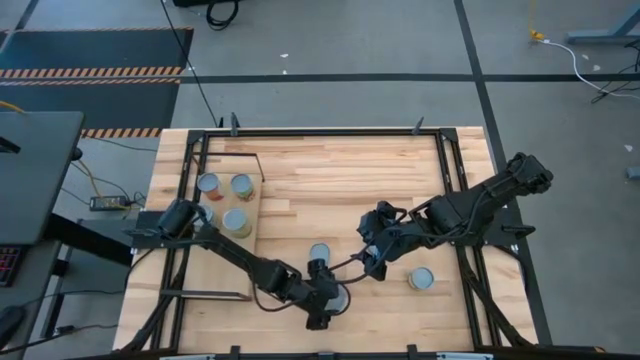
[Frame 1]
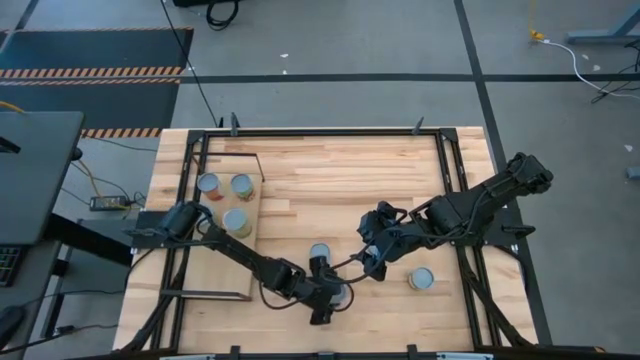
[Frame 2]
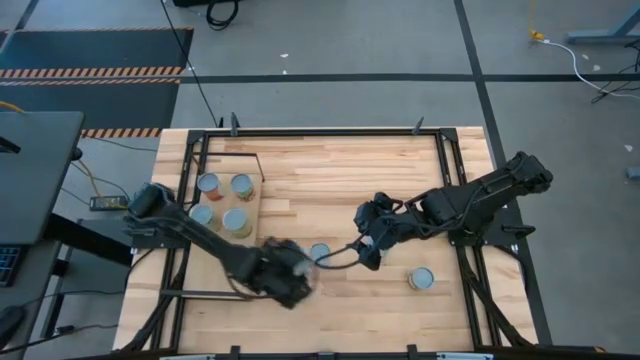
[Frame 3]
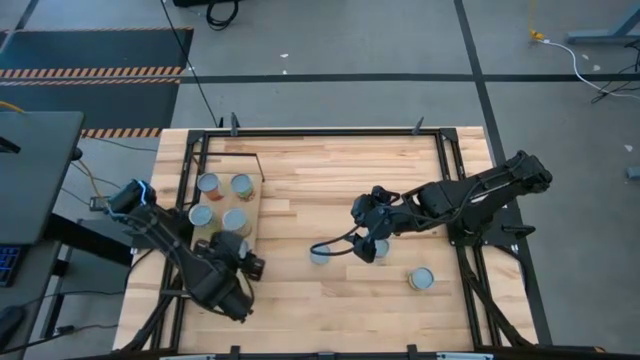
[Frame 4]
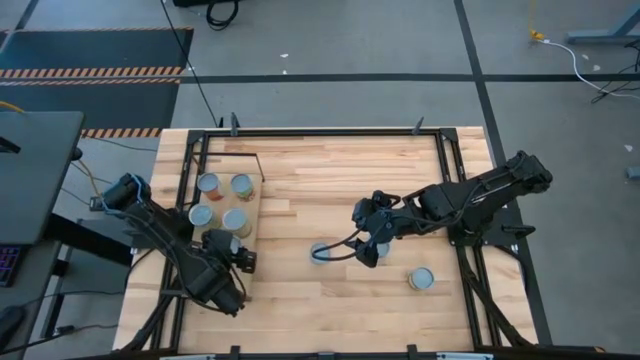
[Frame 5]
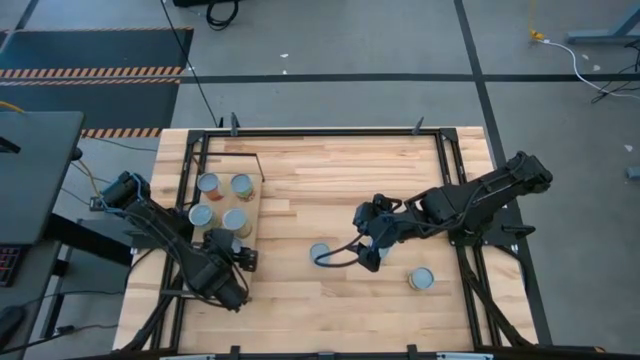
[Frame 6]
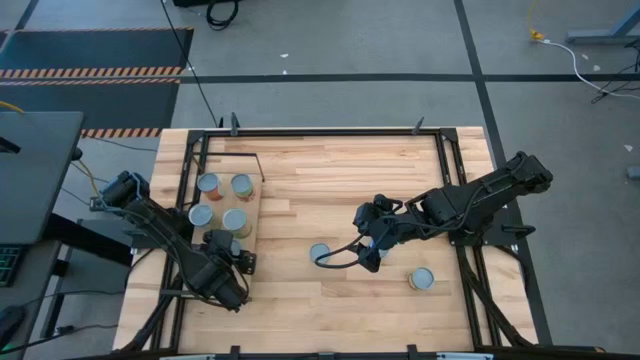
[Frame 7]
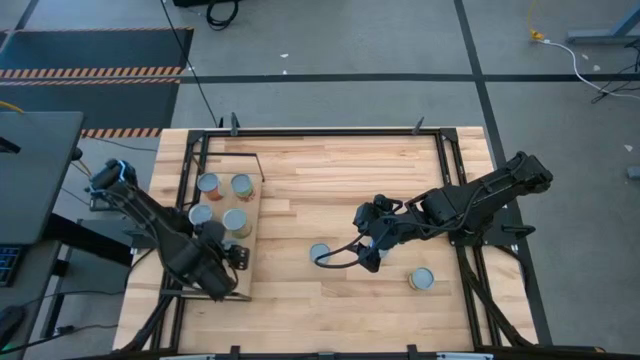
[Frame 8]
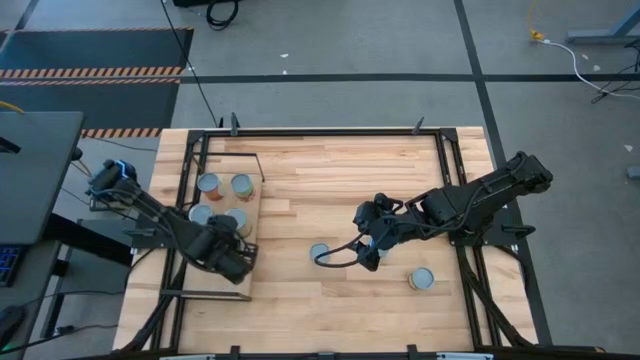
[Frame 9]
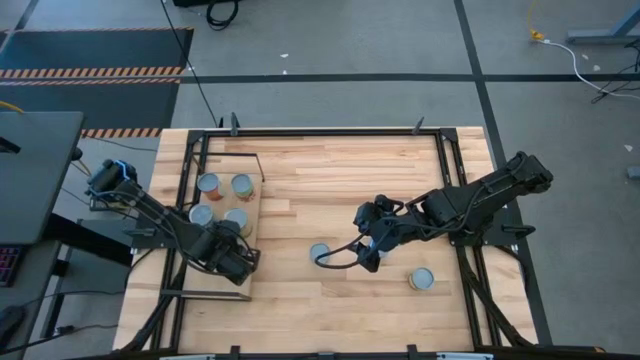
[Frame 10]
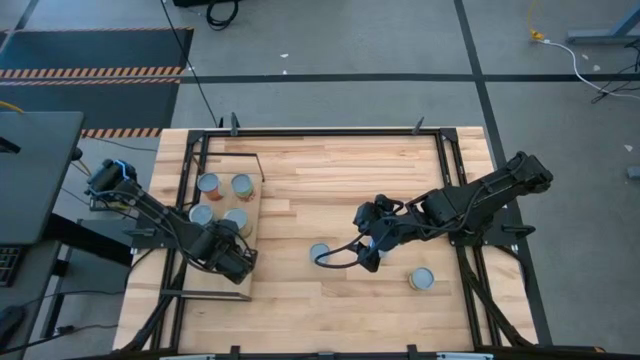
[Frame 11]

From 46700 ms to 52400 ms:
Task: Pick and place cans onto a shelf
Put the canned diced tomato on the shelf

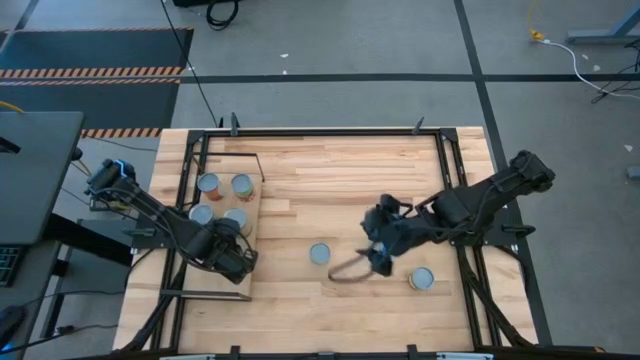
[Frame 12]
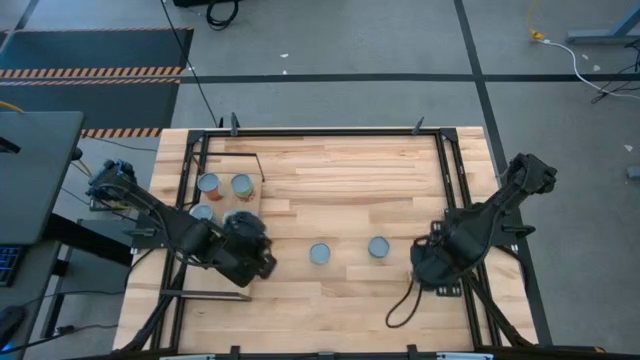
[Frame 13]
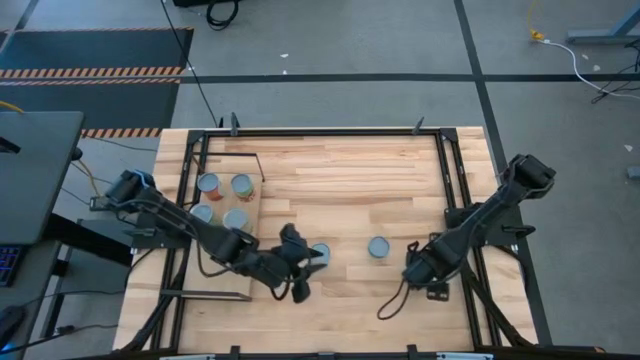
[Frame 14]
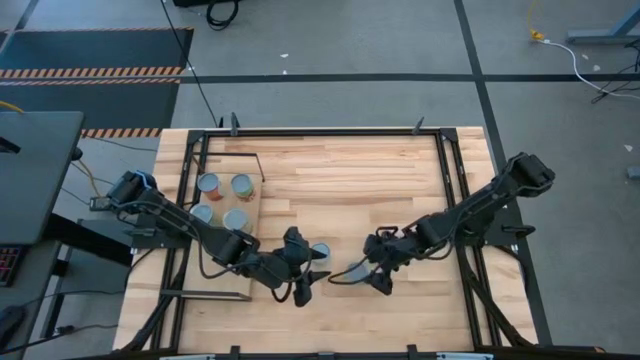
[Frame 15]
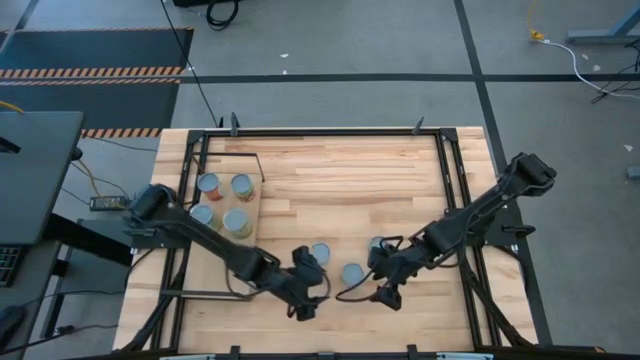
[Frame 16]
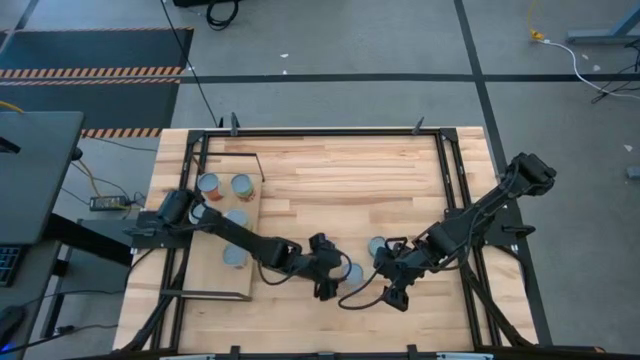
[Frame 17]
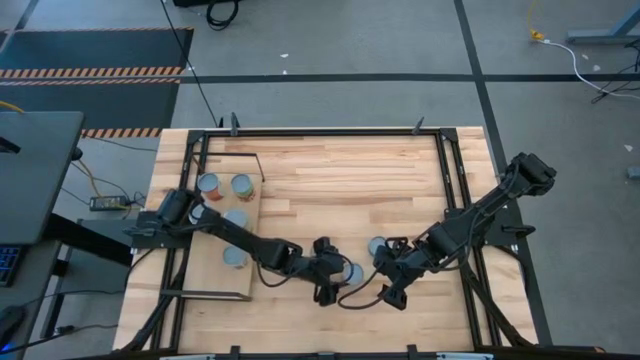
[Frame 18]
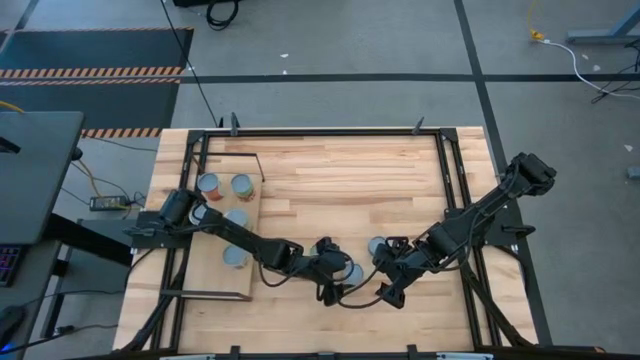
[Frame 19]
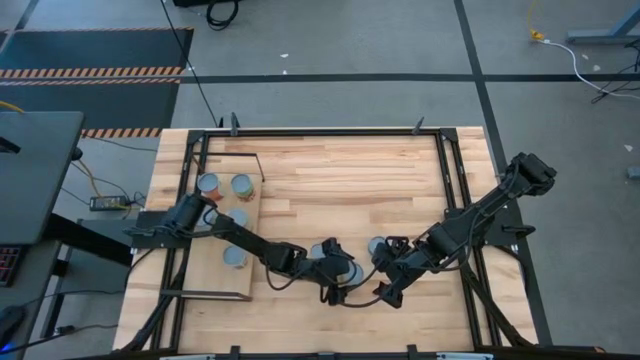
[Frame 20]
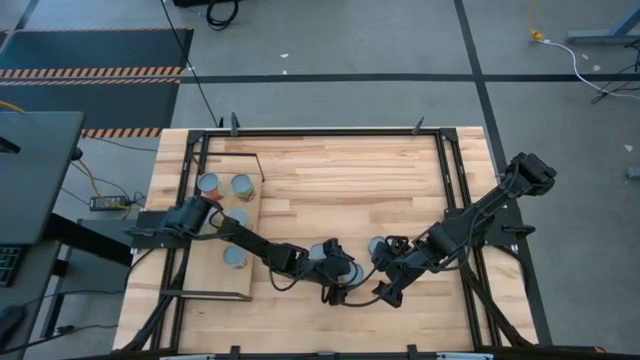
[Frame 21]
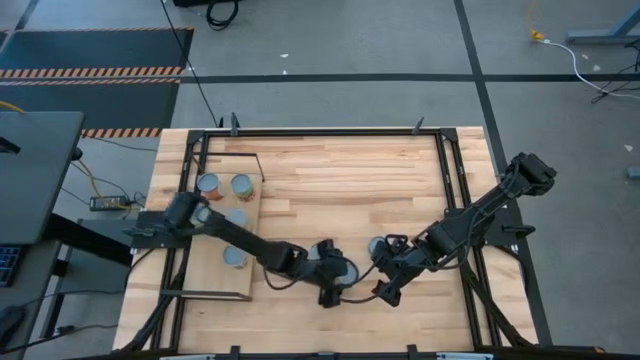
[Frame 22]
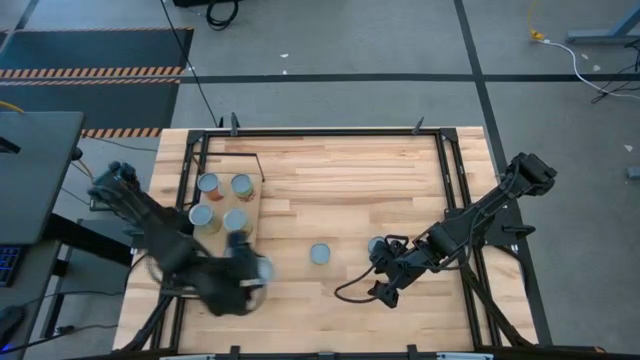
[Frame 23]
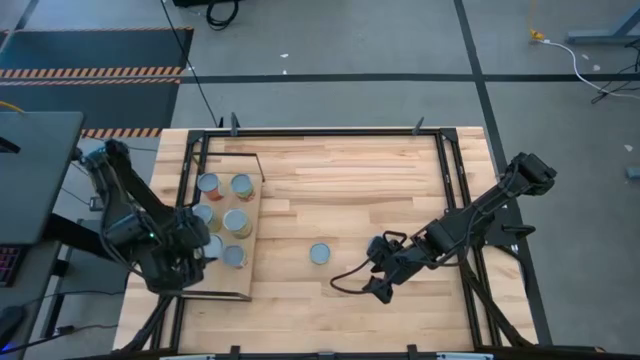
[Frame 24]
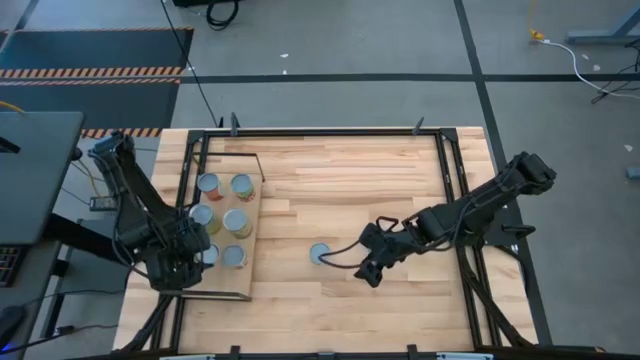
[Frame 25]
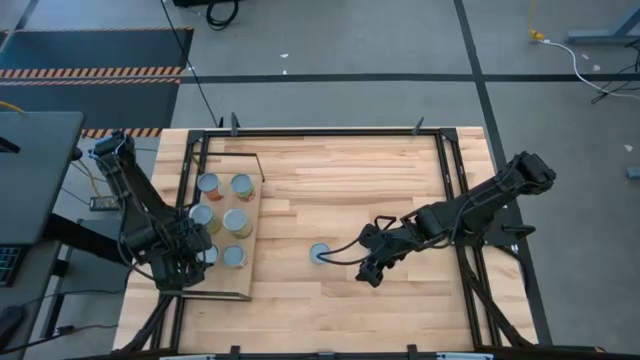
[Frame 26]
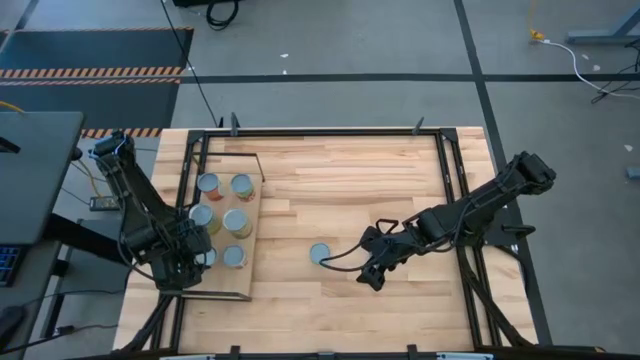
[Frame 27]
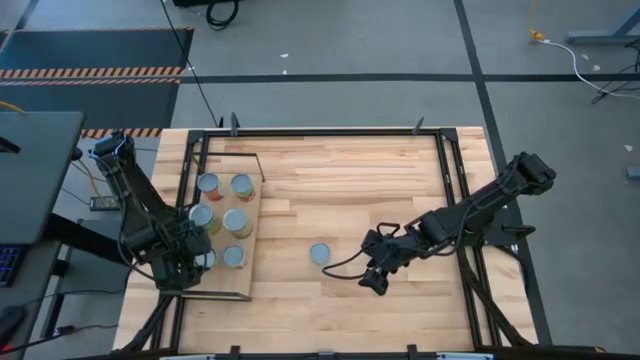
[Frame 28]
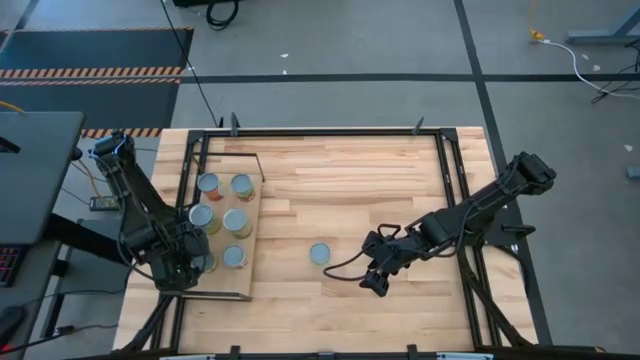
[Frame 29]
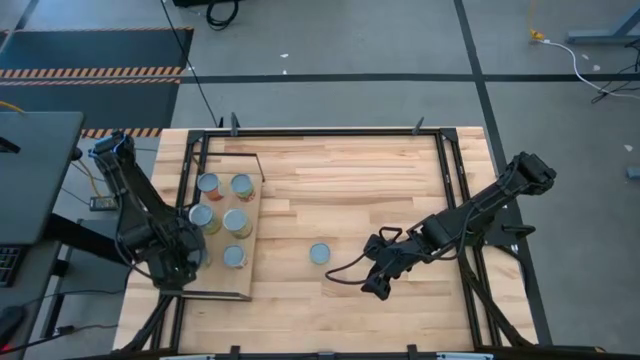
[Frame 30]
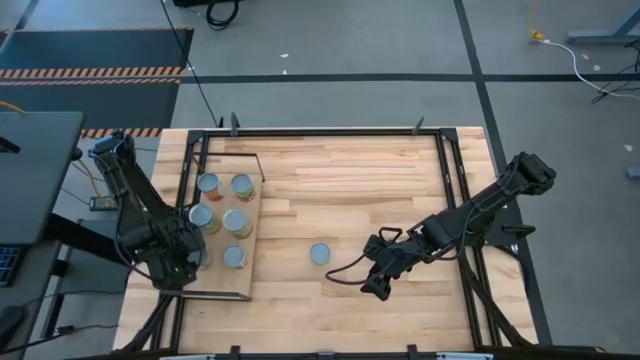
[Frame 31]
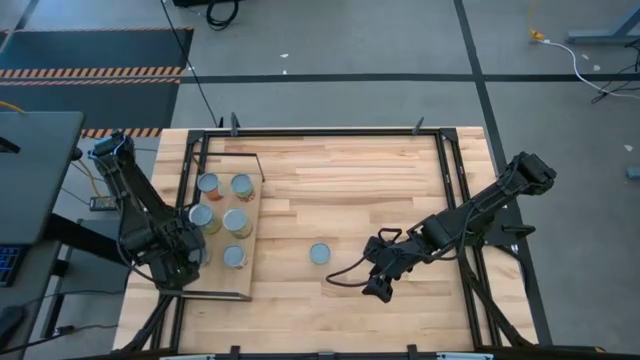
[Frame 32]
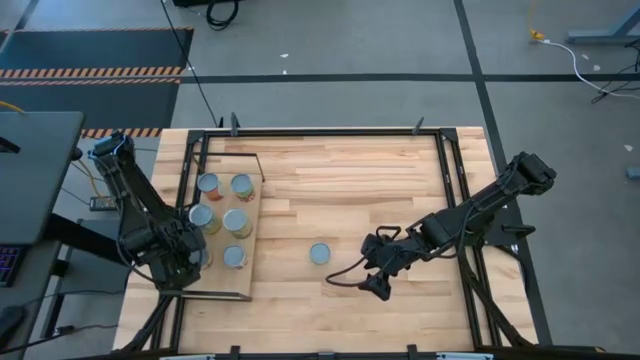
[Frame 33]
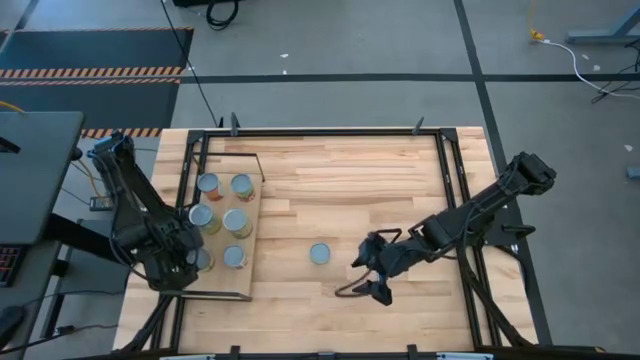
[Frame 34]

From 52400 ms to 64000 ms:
Put the canned peaches on the shelf

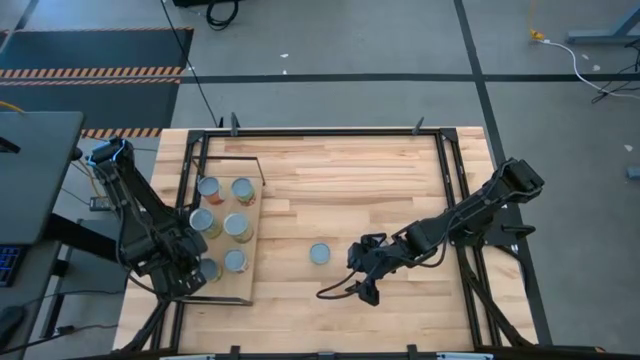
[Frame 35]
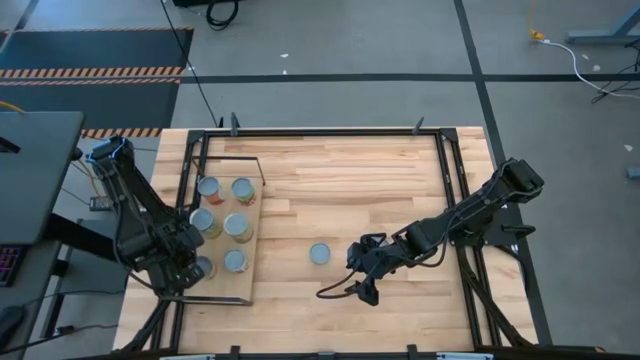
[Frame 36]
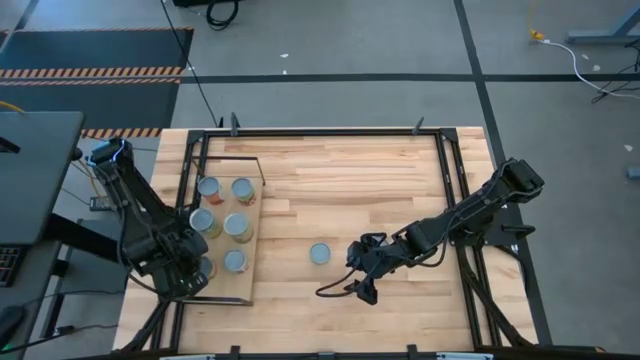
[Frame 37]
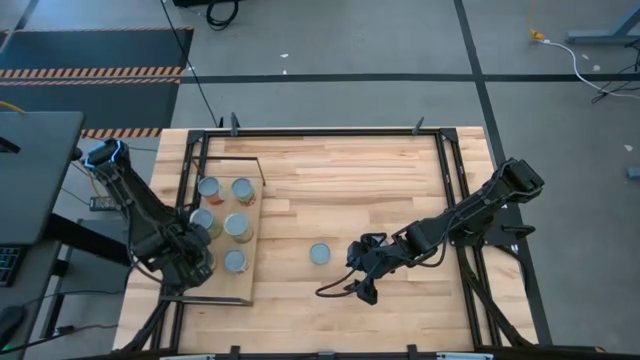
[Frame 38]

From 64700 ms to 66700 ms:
Put the canned peaches on the shelf

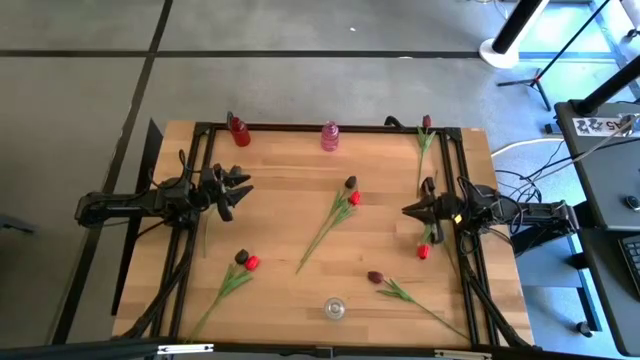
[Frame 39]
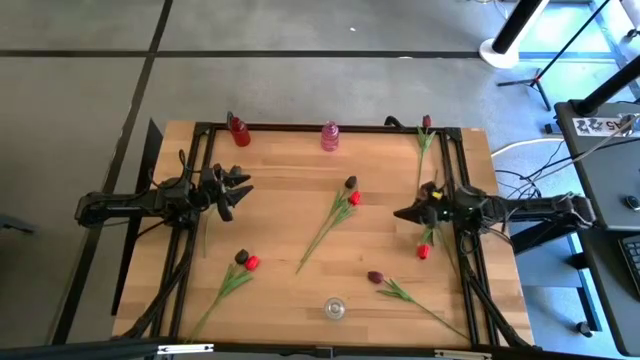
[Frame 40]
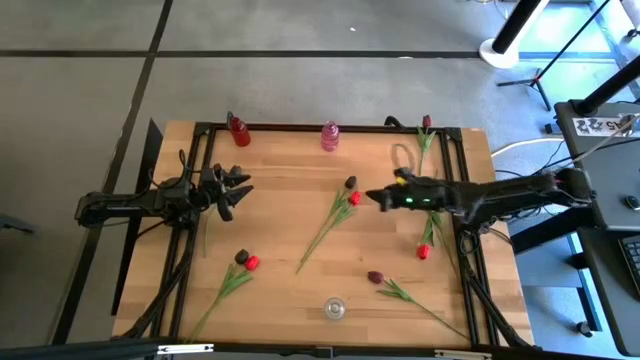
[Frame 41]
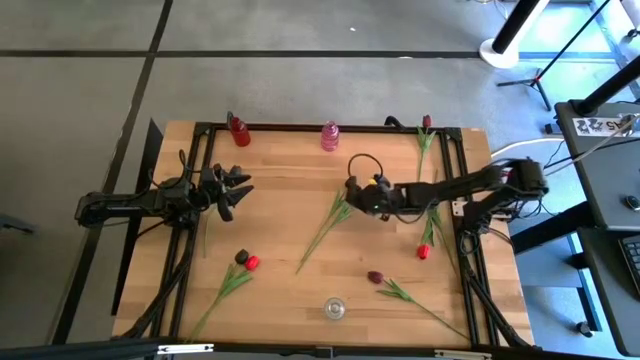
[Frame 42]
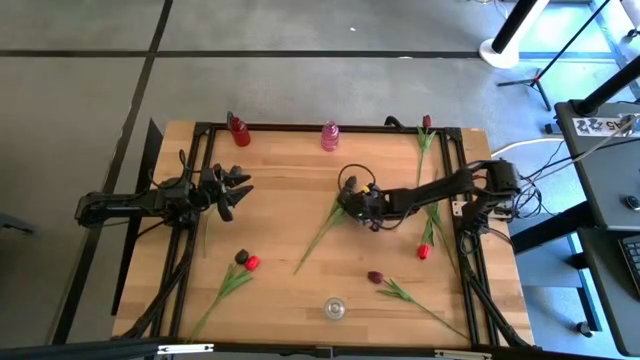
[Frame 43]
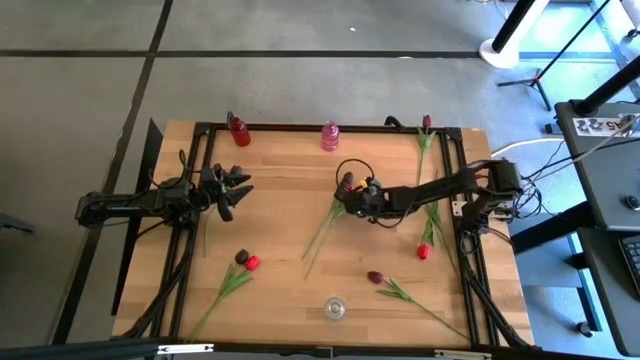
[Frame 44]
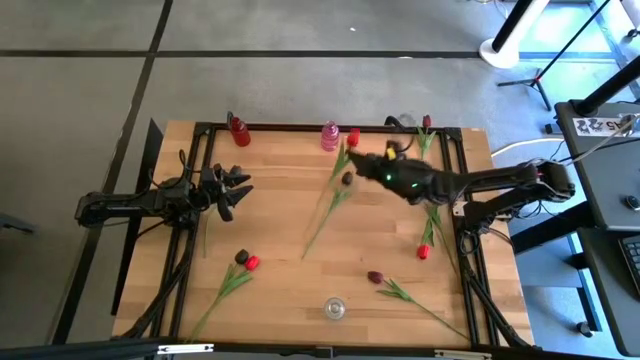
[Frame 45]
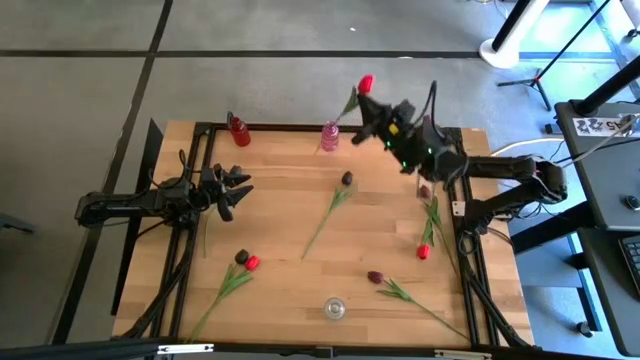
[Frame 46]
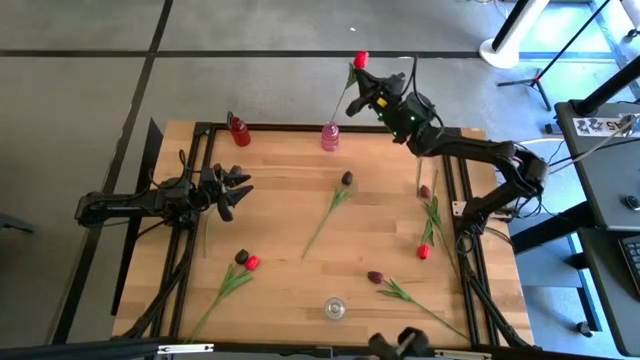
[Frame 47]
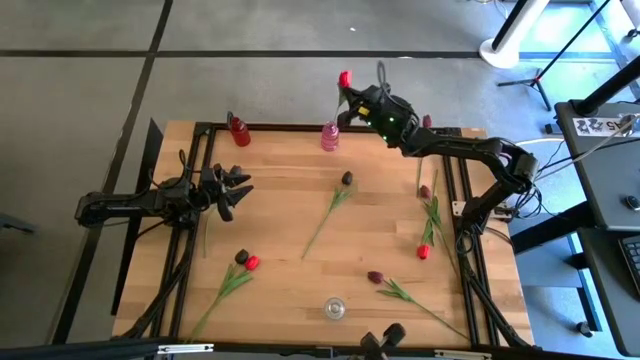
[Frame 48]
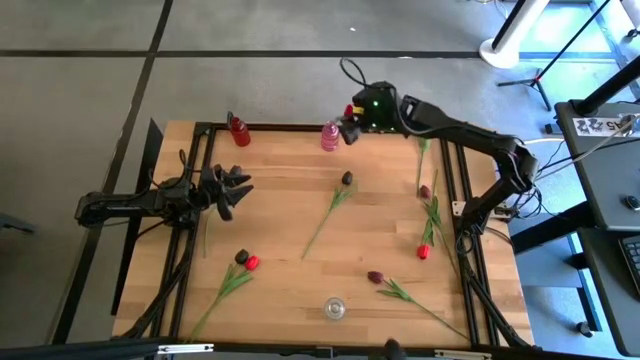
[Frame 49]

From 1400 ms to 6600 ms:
Task: Sort flowers into vase by color
Put the top left red flower into the pink flower vase
